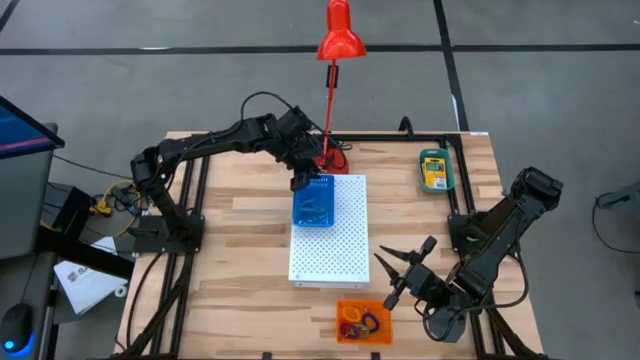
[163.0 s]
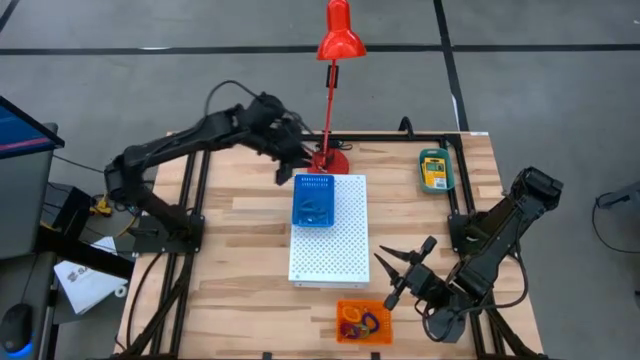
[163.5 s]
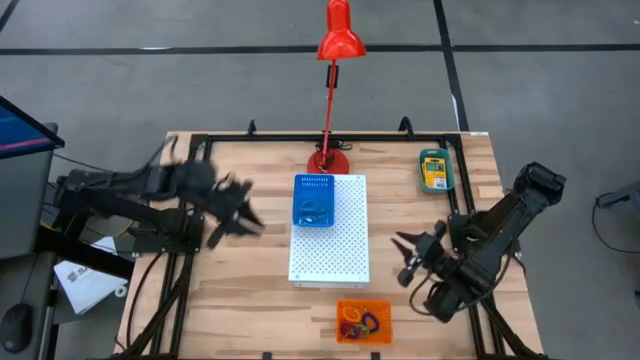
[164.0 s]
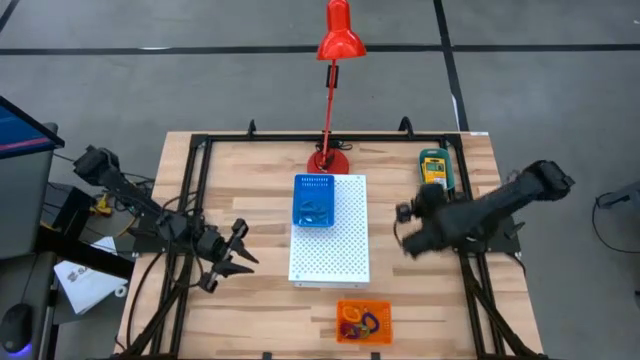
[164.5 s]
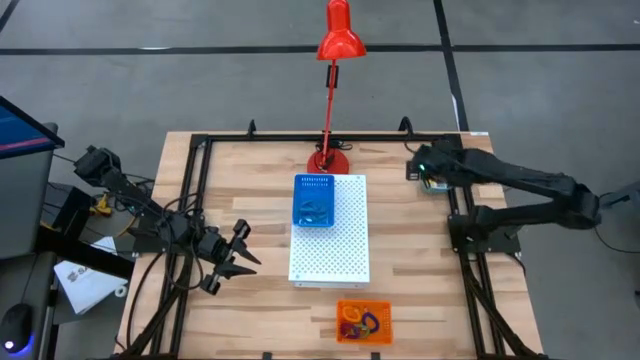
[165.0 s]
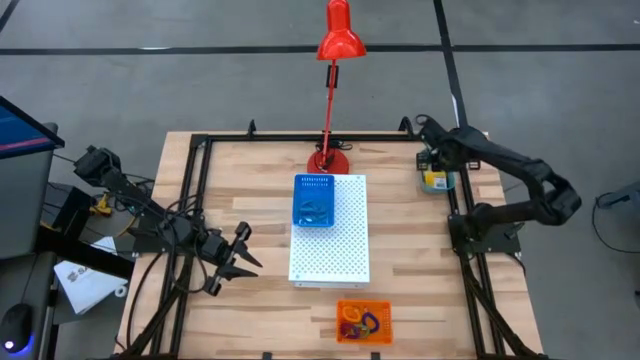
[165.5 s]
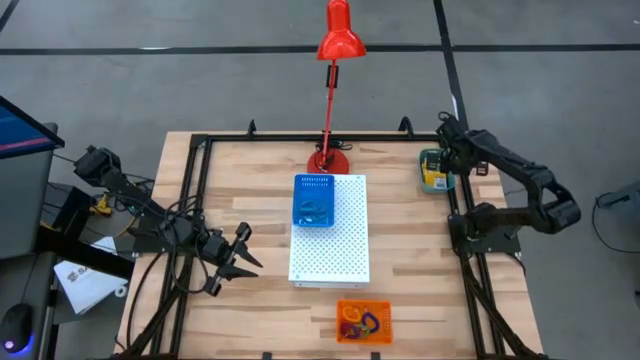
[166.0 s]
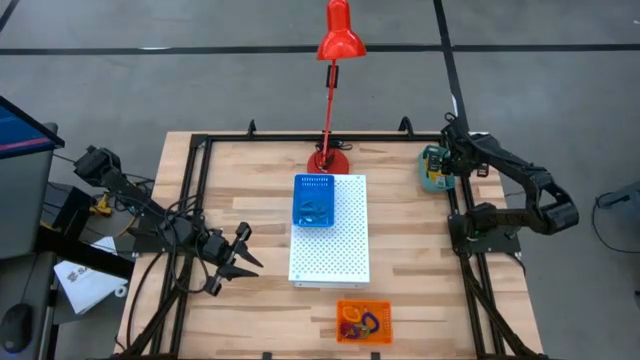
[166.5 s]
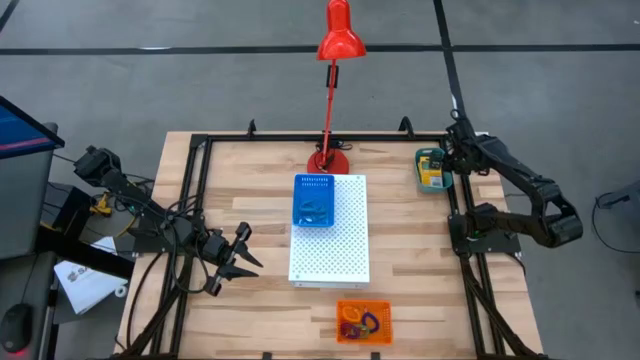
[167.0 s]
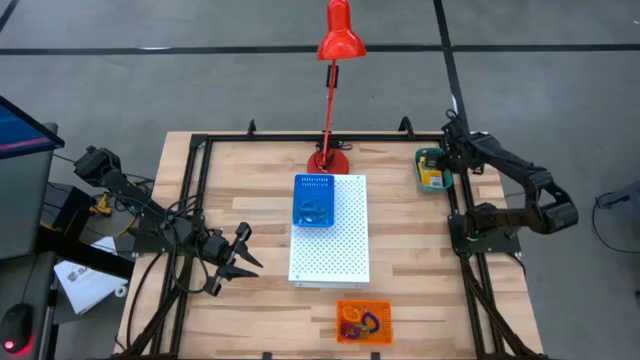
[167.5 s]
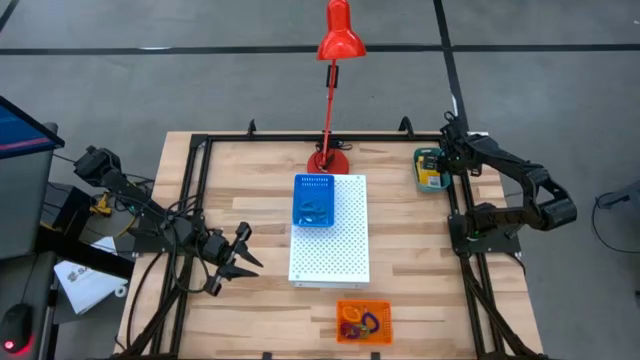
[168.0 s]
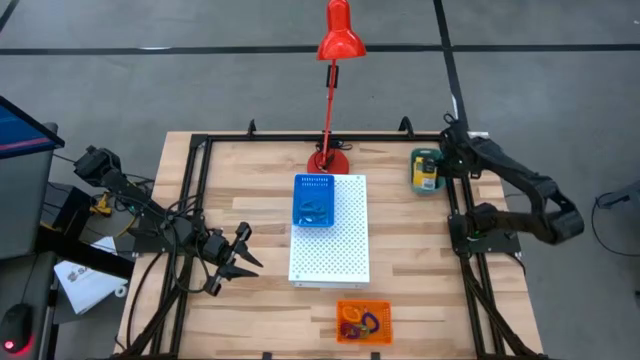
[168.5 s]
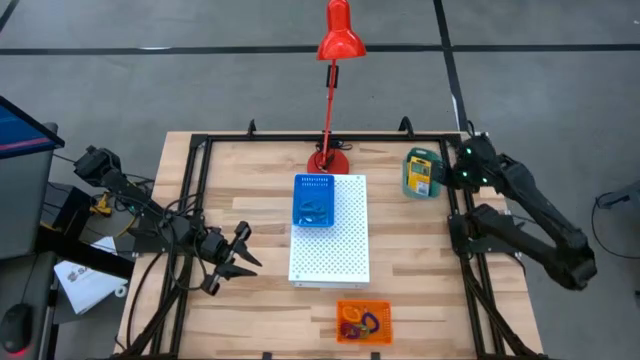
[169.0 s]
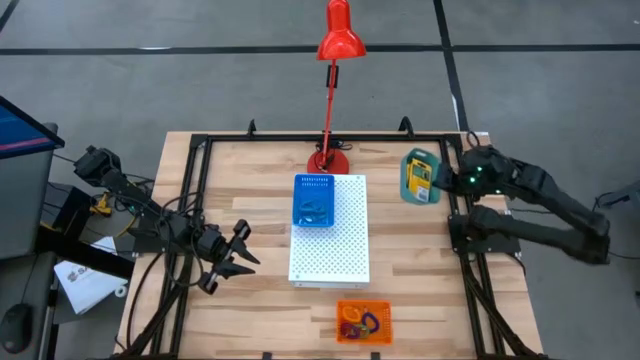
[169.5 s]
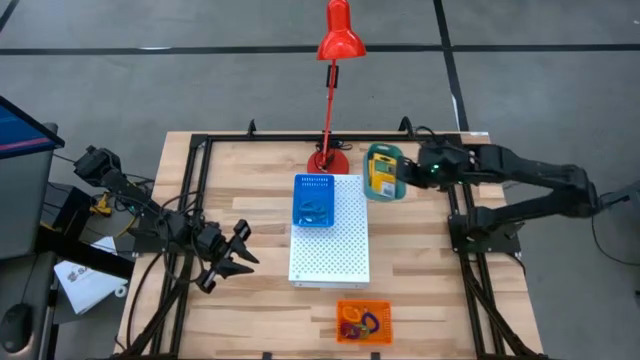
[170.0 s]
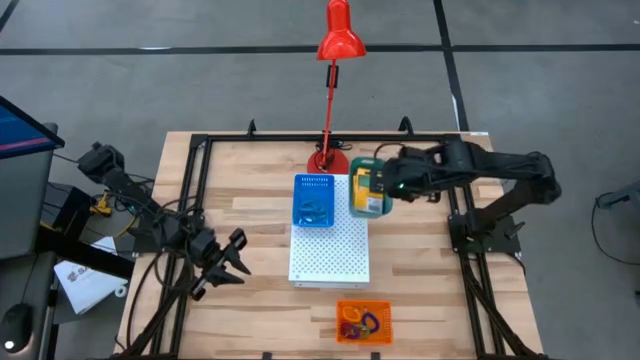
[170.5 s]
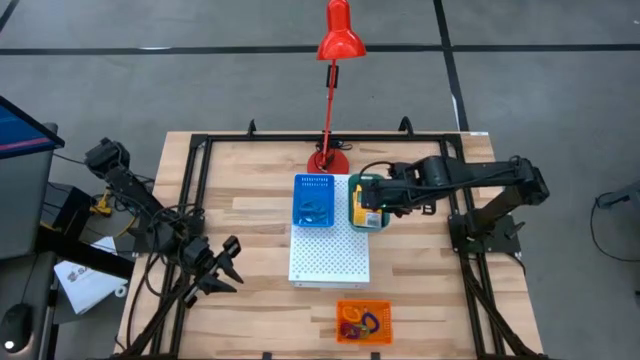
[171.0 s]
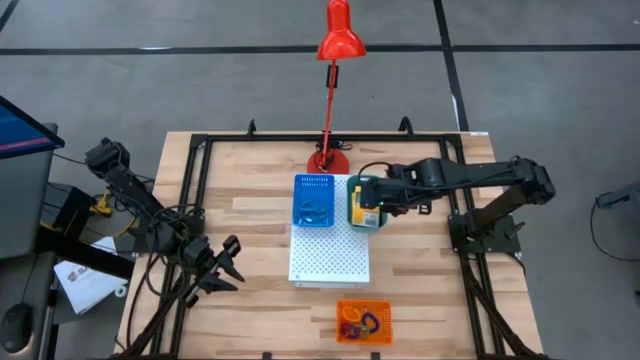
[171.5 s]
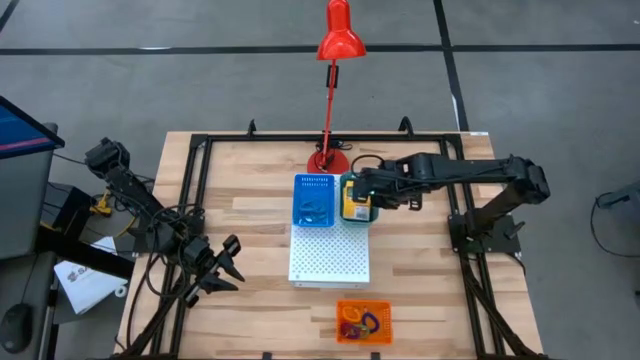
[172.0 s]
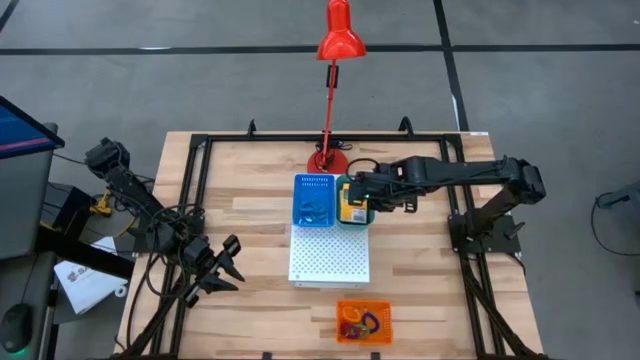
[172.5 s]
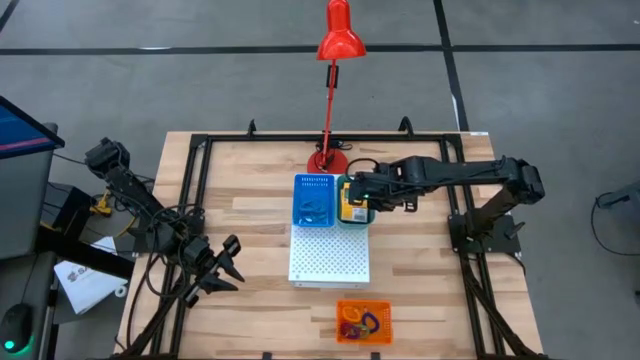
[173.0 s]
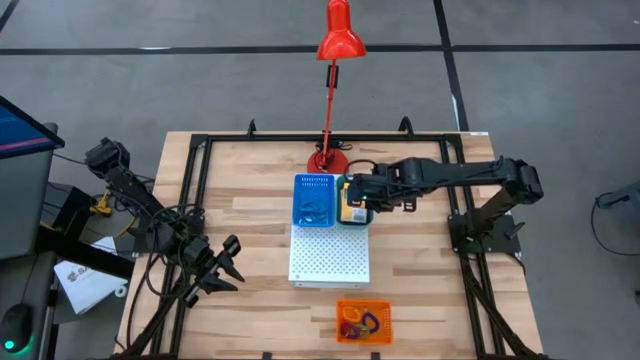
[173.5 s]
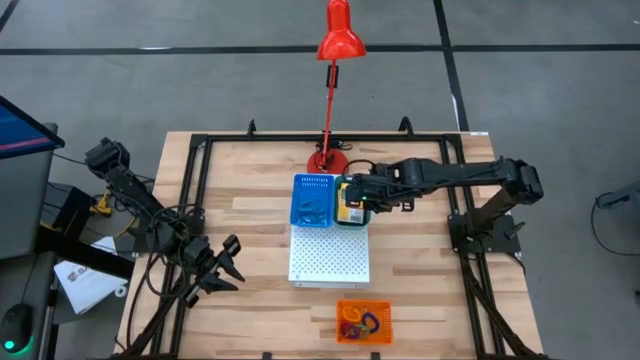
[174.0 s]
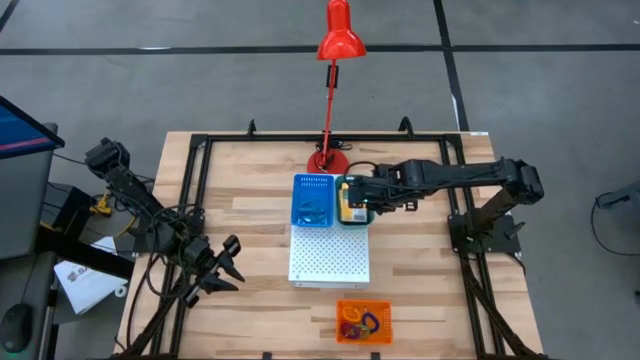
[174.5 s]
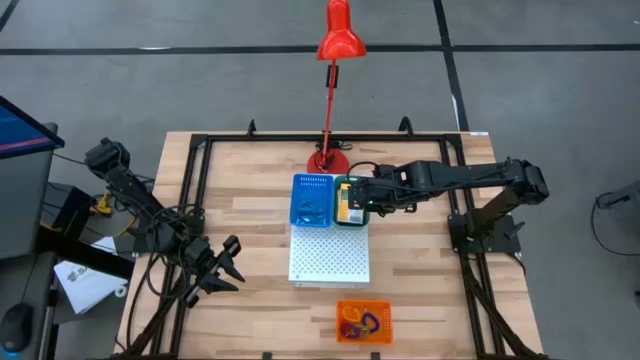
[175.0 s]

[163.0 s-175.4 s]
Task: Pick & Place Office Desk Supplies
Put the green bin on the shelf

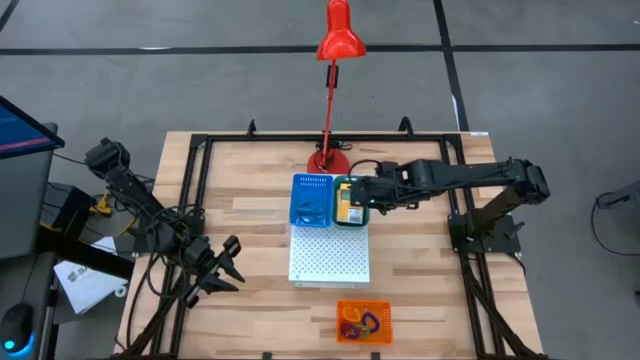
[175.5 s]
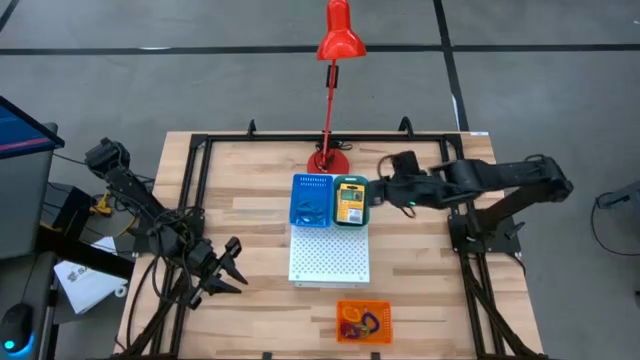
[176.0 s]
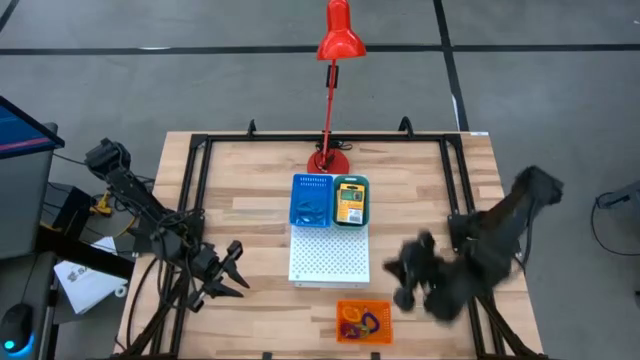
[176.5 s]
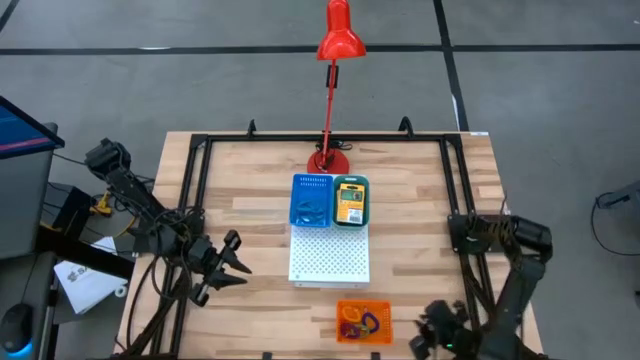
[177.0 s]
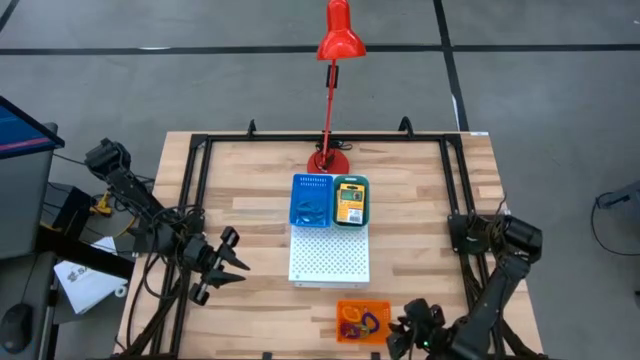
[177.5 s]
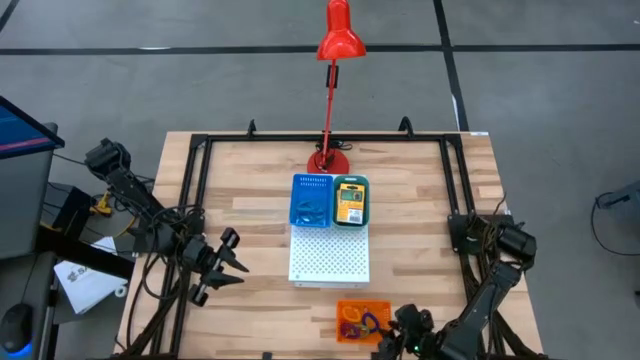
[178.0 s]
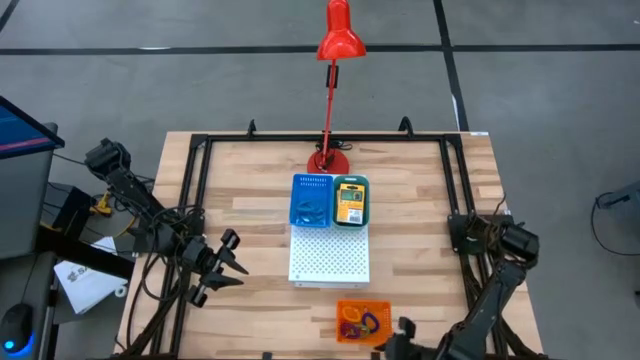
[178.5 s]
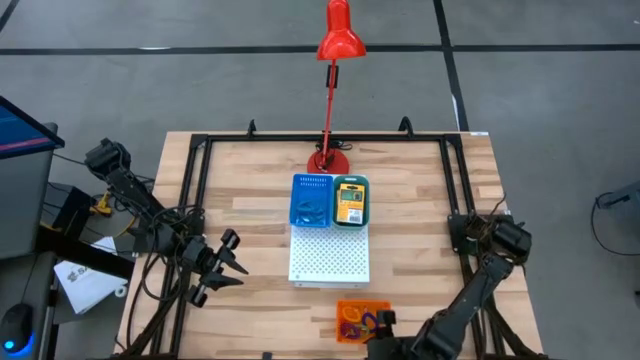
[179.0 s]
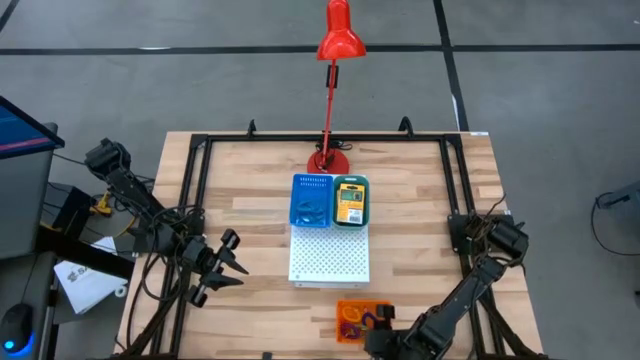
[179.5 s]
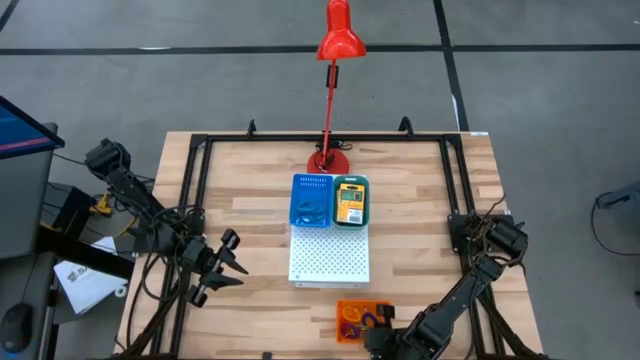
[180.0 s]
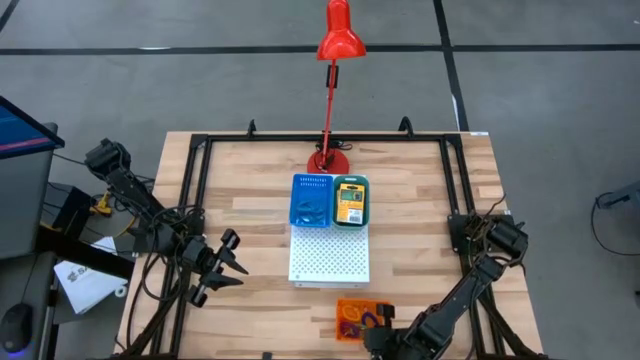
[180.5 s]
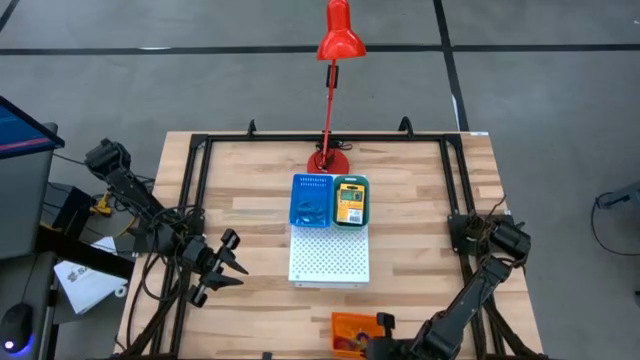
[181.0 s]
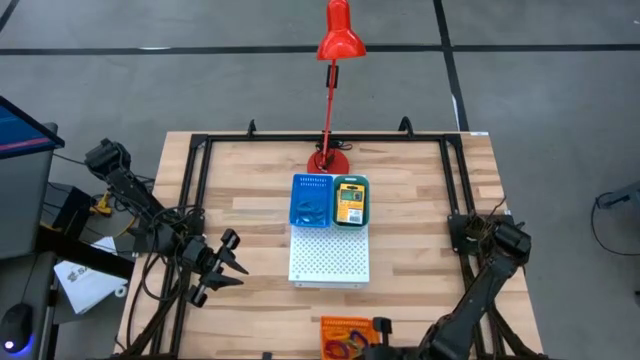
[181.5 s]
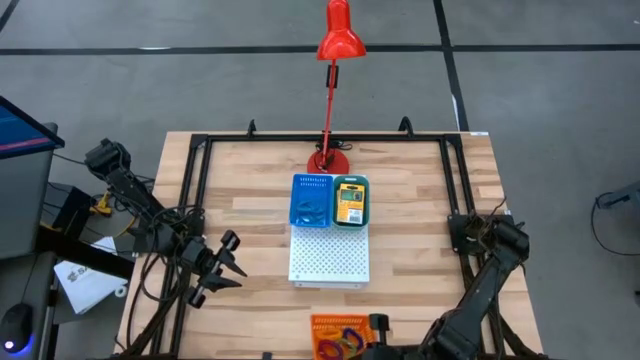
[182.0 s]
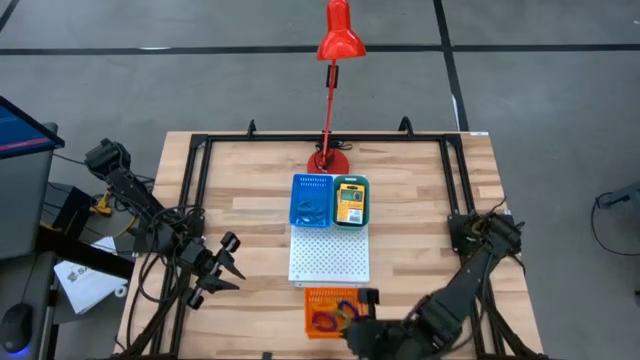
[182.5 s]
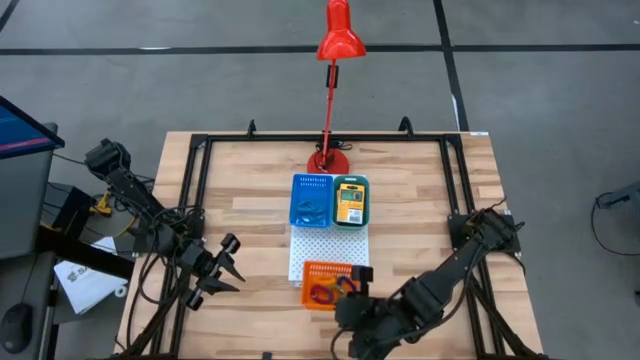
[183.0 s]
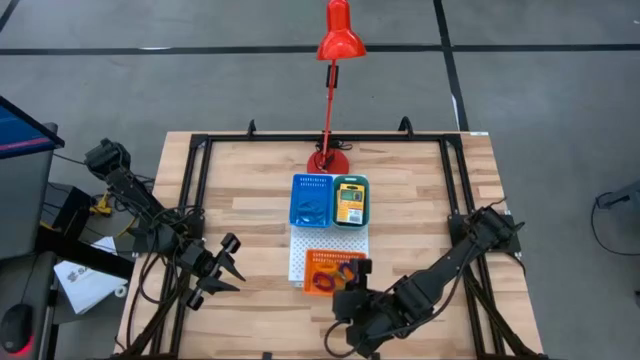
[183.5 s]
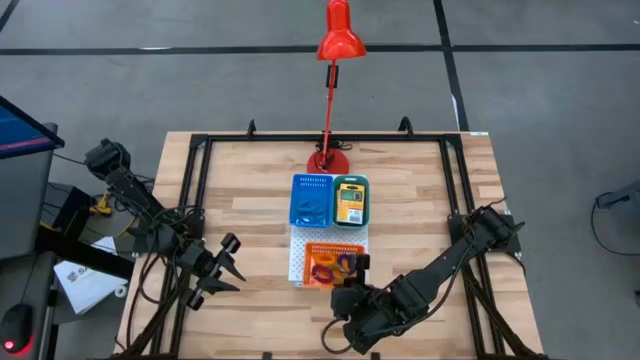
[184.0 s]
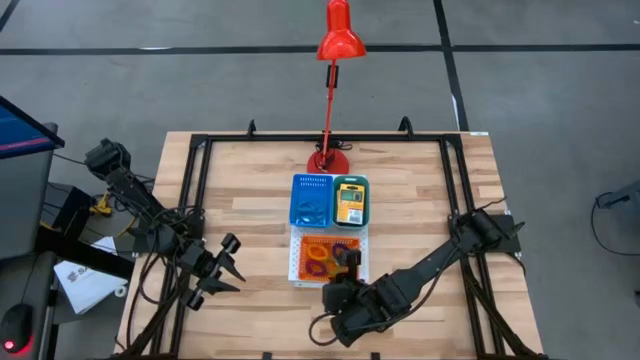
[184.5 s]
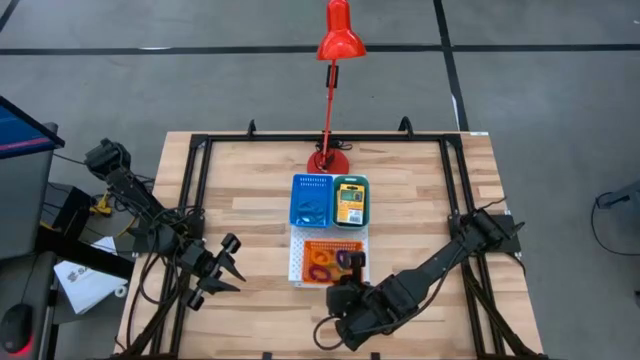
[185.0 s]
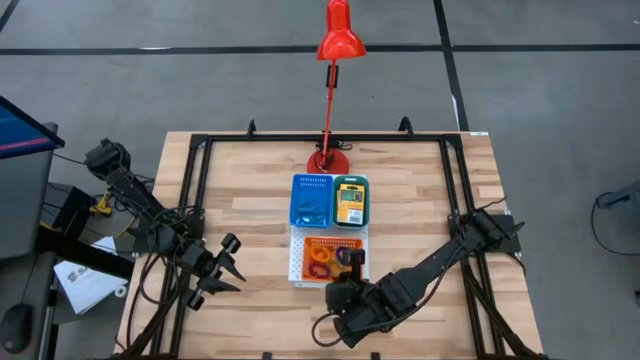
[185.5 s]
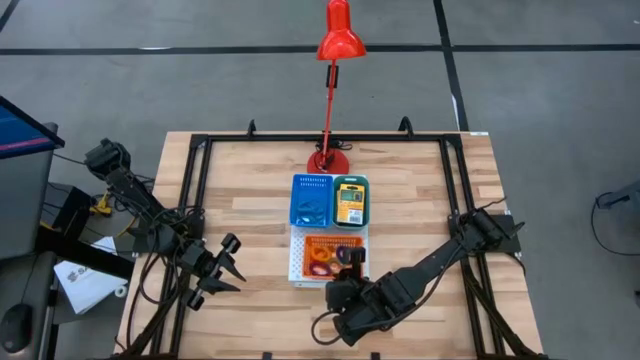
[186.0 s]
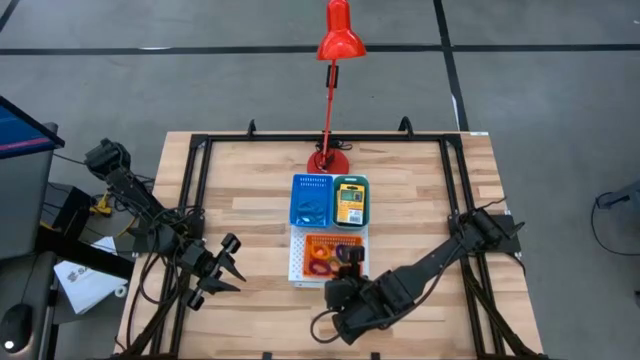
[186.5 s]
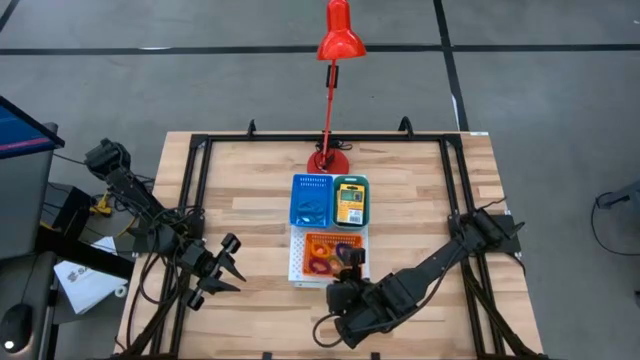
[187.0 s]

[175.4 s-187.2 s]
Put the orange bin on the shelf
